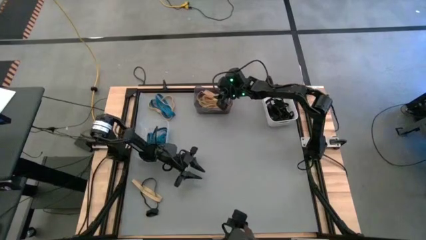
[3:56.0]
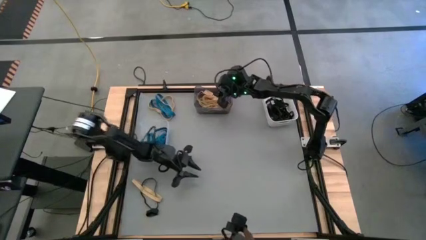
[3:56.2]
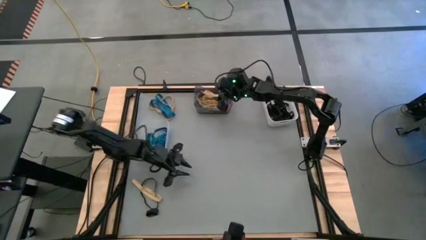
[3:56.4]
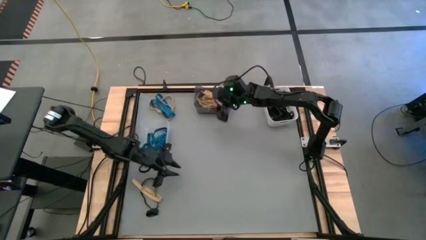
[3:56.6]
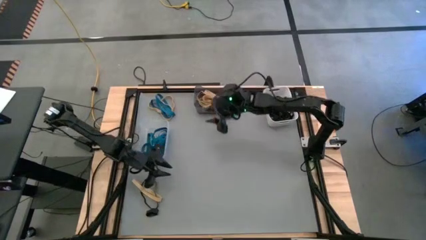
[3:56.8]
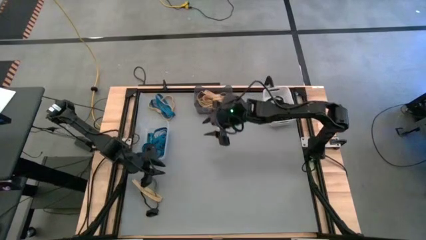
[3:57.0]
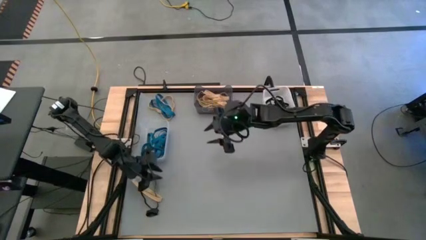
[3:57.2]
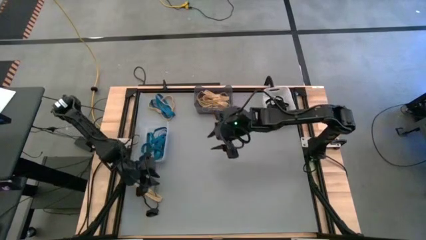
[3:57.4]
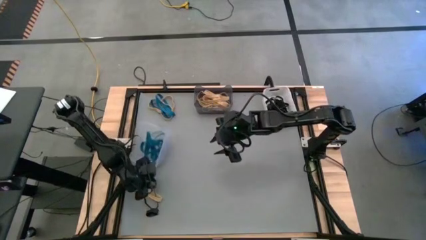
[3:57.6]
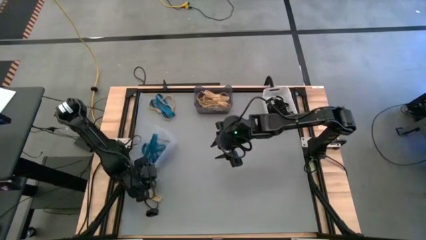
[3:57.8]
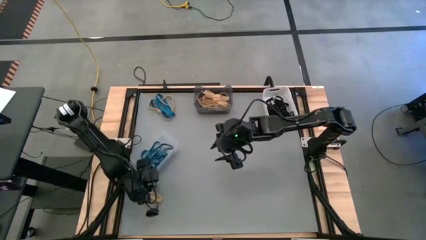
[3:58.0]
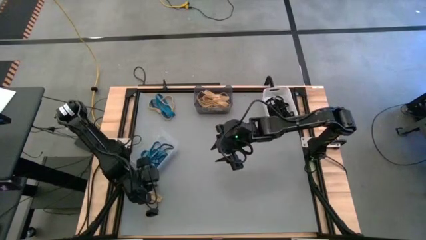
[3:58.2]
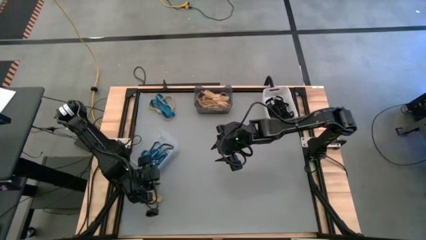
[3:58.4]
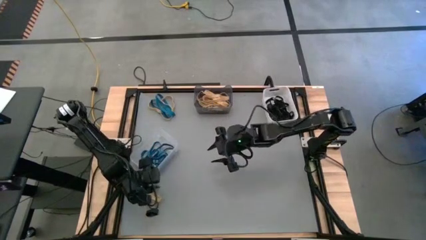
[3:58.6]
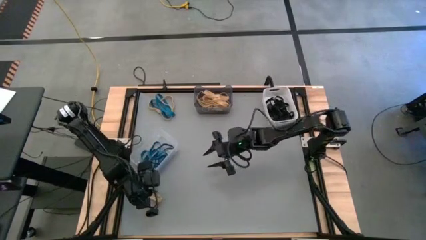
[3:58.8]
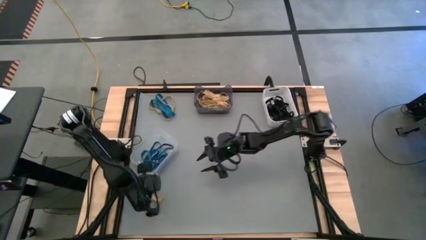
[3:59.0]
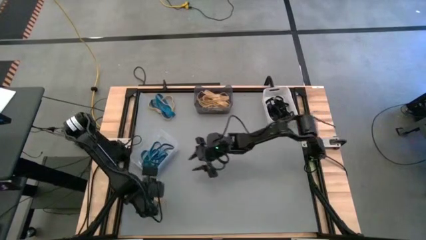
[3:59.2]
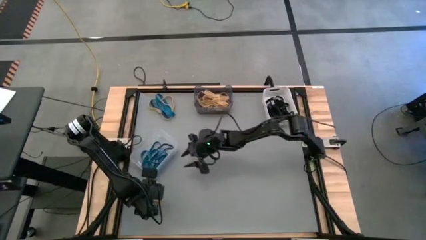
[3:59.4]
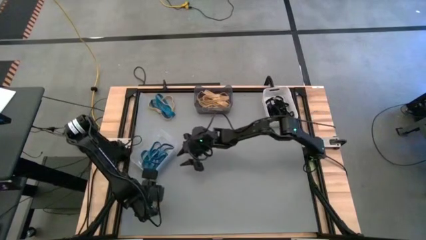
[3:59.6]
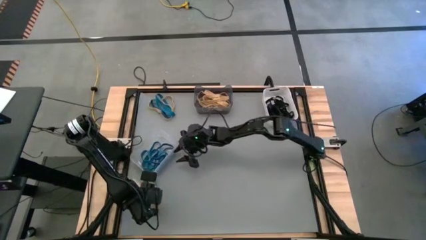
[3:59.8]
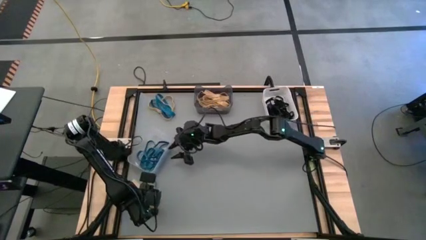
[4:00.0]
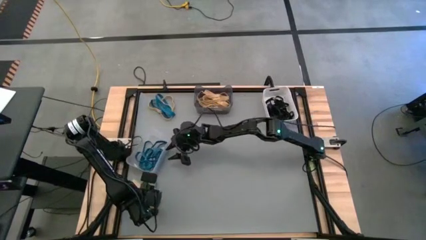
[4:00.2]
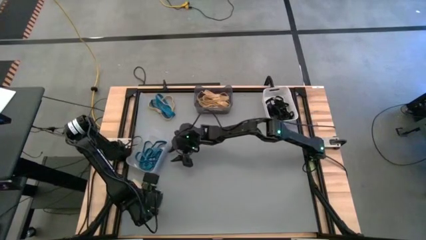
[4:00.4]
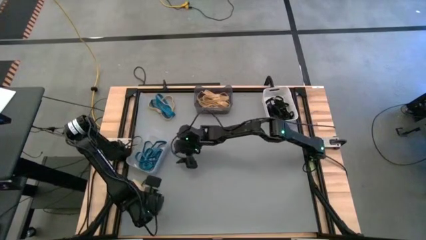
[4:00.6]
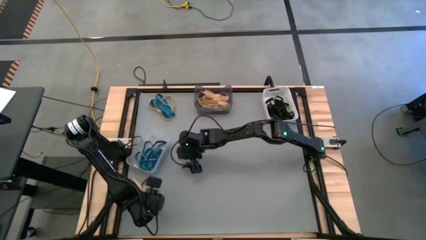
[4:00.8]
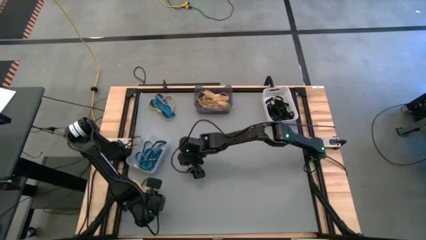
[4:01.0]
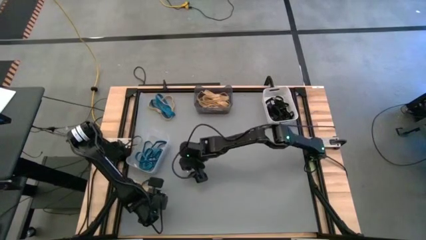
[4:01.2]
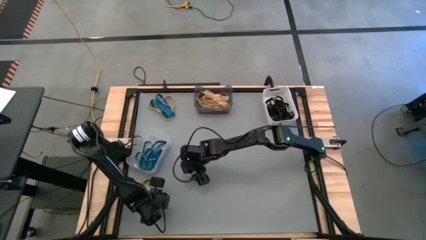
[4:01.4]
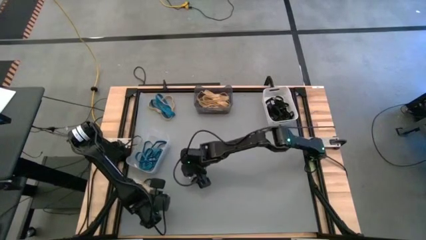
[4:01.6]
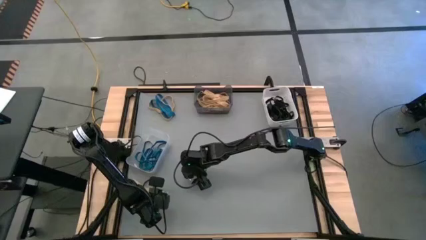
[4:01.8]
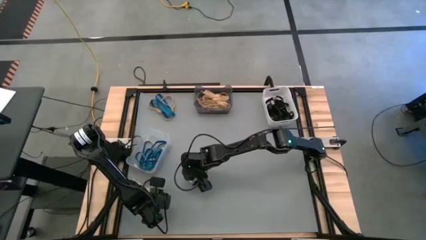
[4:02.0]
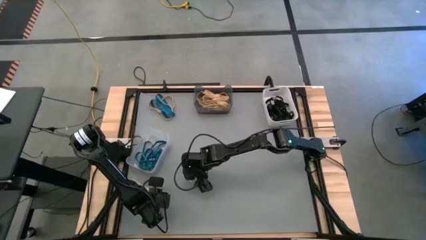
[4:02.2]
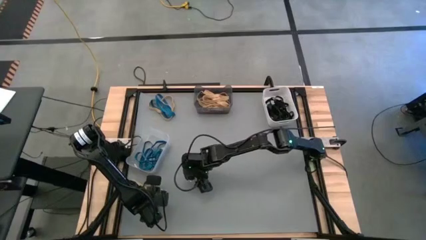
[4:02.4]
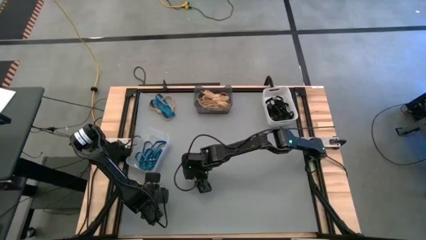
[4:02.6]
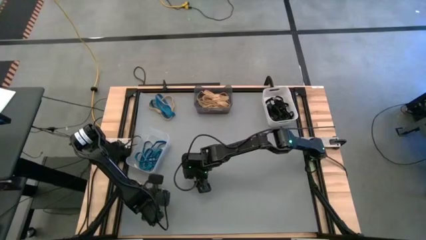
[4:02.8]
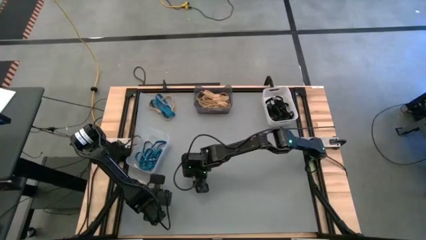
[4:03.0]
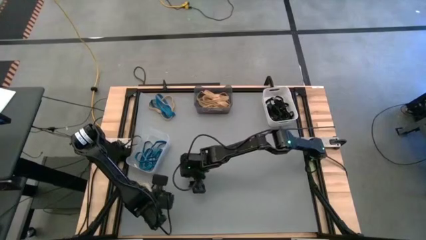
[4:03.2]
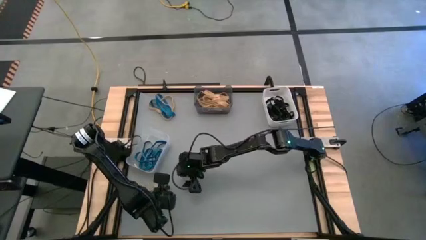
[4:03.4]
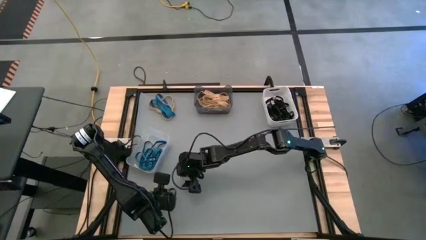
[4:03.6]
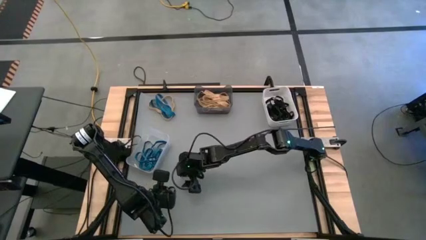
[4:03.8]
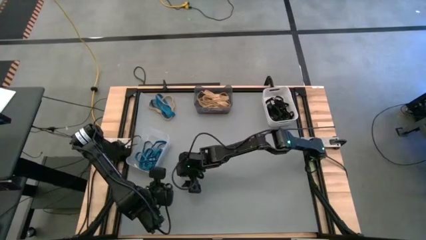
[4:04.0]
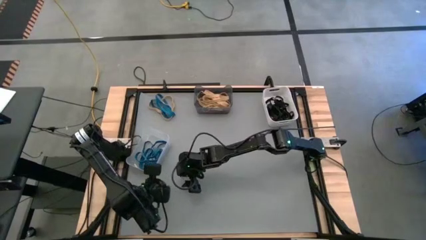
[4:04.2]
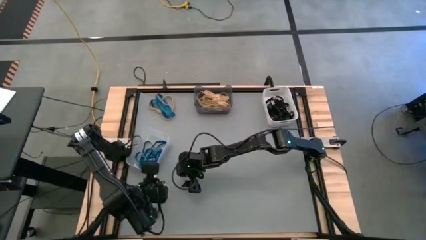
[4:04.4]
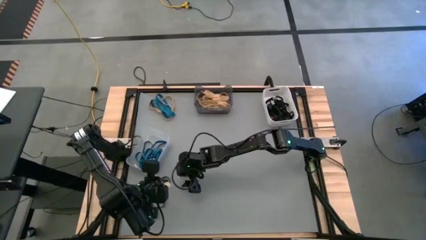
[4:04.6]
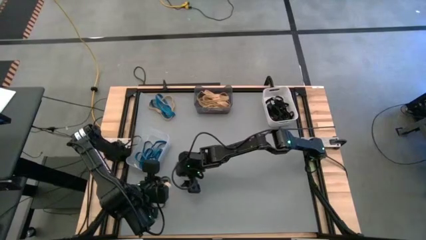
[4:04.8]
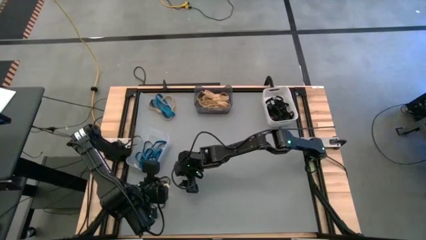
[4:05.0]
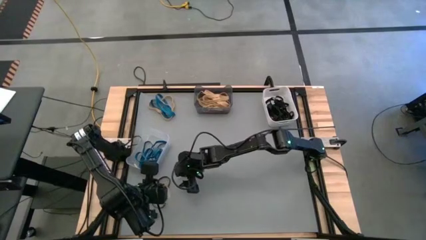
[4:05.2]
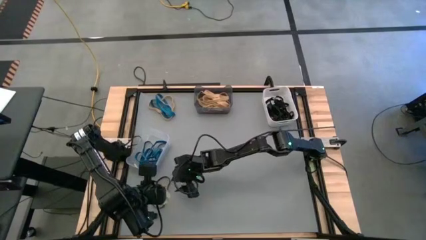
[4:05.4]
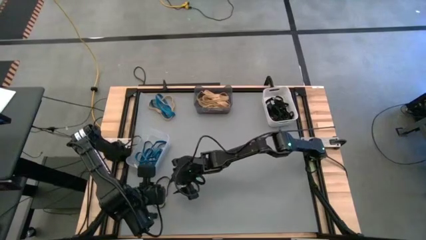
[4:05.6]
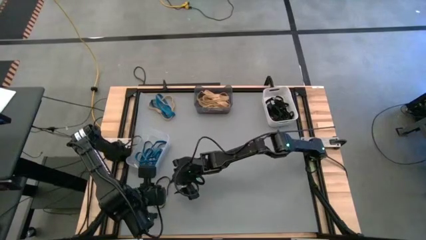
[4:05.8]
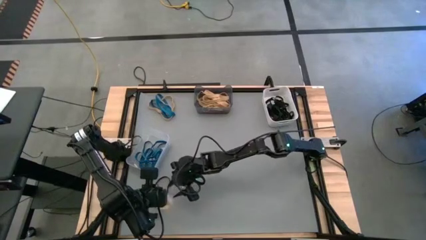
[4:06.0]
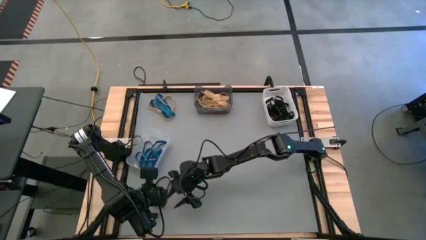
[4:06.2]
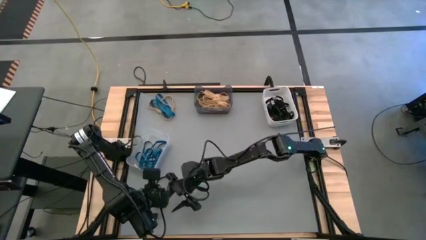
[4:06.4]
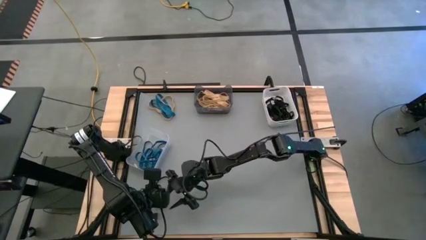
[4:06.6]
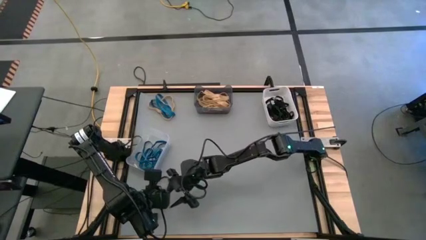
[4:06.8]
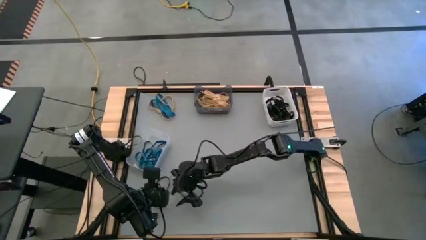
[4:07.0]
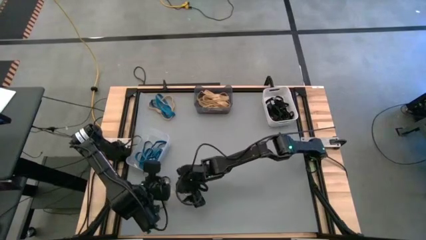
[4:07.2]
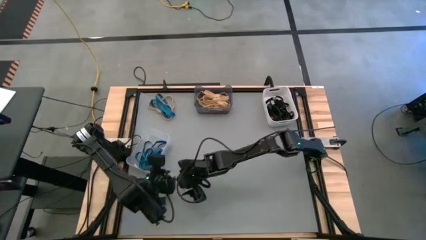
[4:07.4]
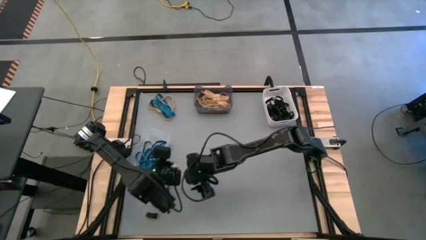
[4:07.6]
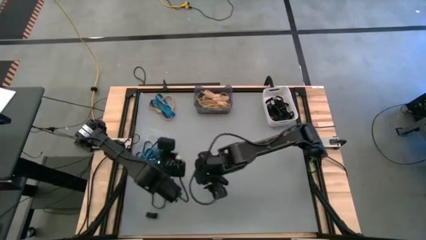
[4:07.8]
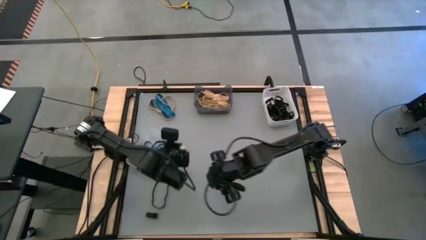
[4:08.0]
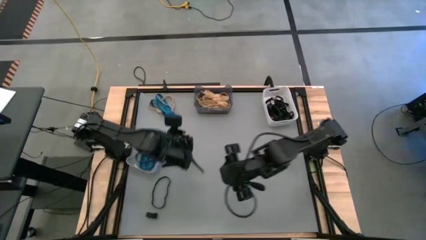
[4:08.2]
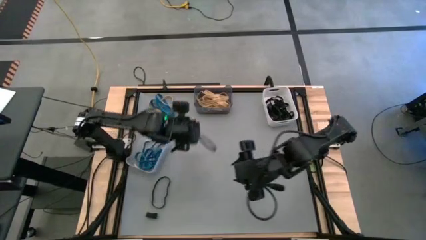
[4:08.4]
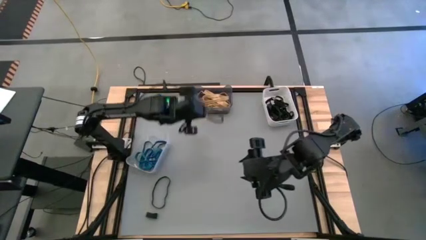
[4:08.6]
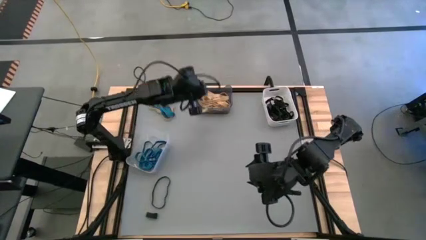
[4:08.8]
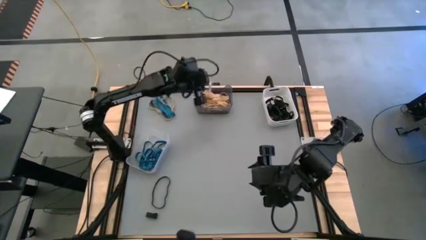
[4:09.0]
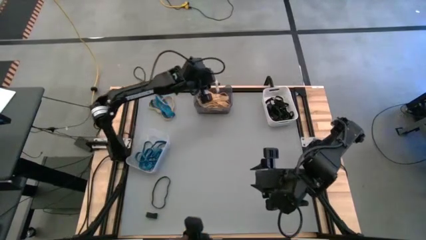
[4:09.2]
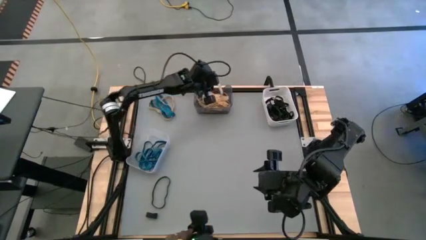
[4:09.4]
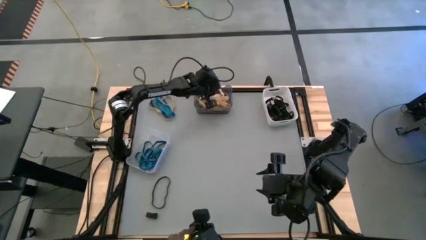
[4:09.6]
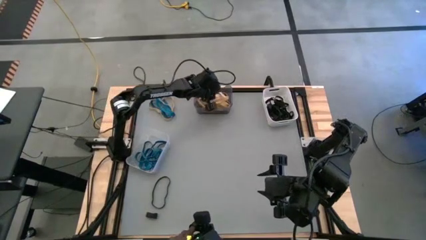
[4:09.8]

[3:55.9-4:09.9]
Task: Sort rubber bands into baskets
Put the brown rubber band into the black bin

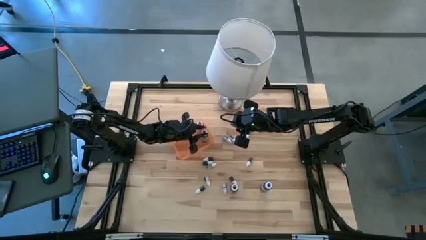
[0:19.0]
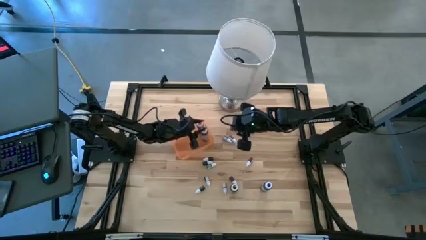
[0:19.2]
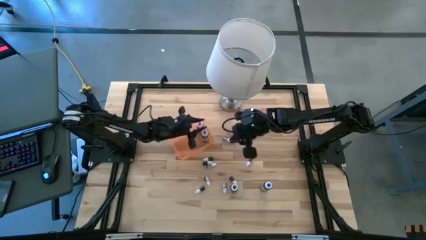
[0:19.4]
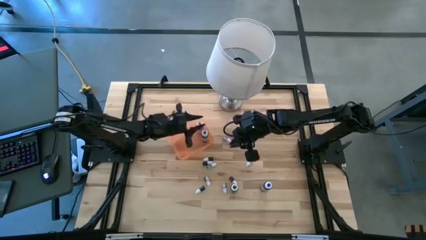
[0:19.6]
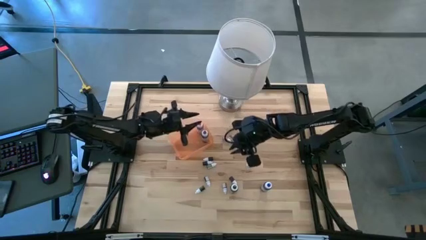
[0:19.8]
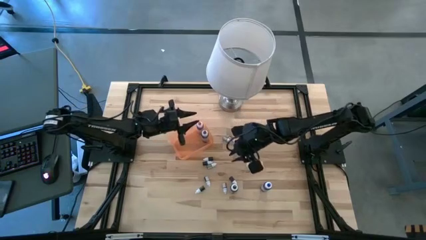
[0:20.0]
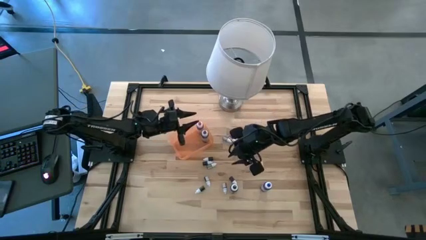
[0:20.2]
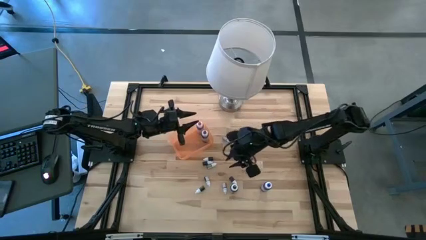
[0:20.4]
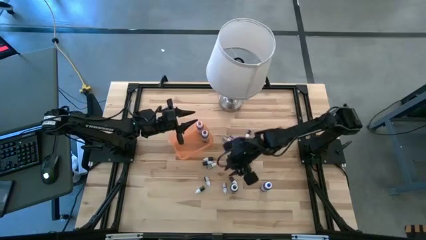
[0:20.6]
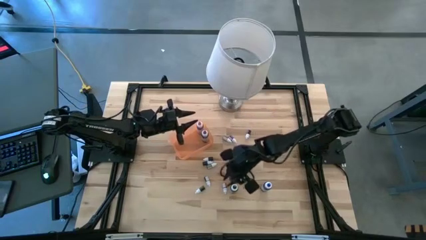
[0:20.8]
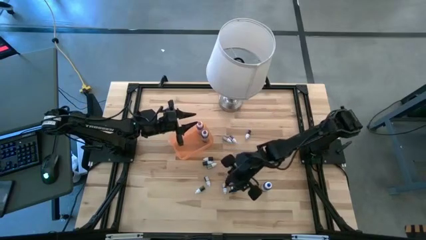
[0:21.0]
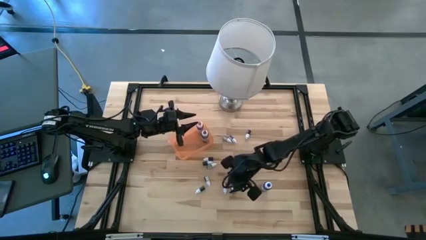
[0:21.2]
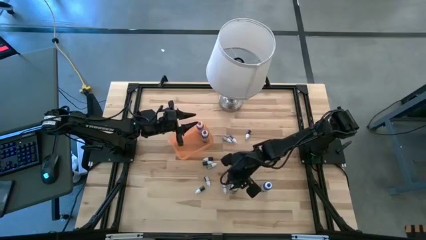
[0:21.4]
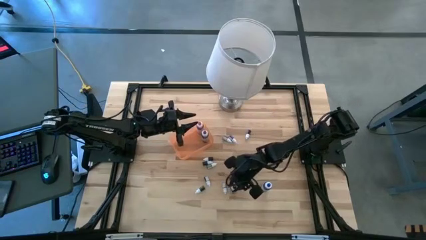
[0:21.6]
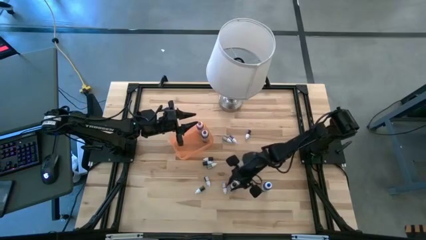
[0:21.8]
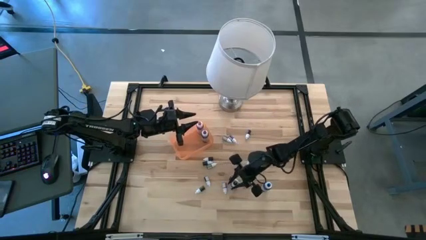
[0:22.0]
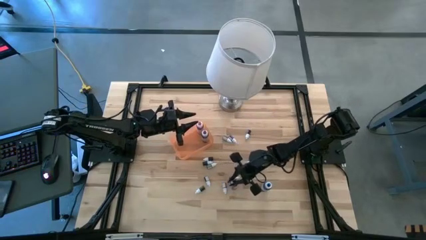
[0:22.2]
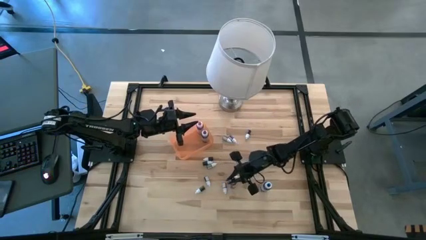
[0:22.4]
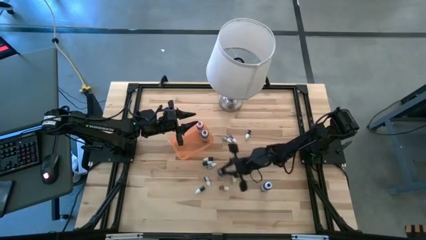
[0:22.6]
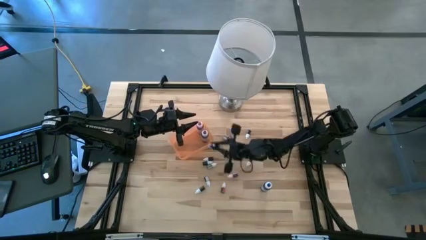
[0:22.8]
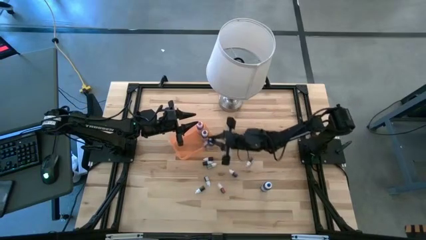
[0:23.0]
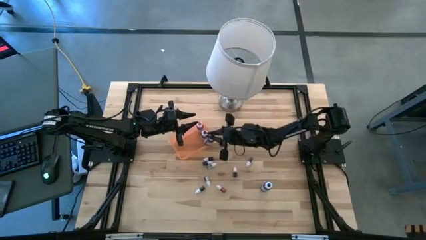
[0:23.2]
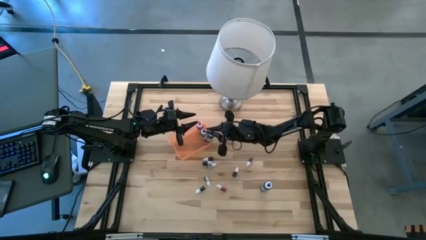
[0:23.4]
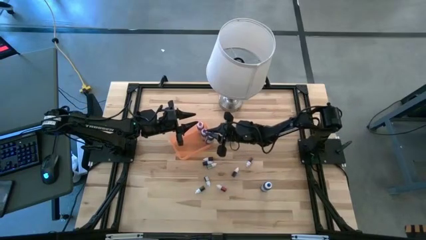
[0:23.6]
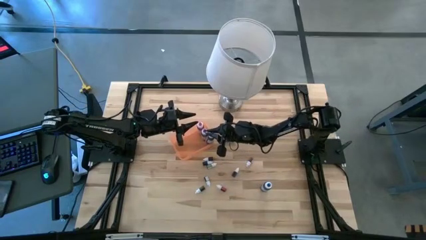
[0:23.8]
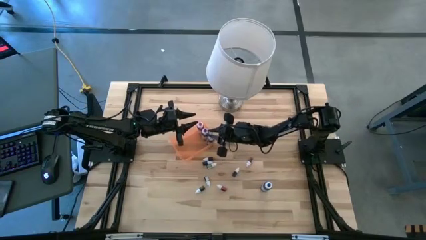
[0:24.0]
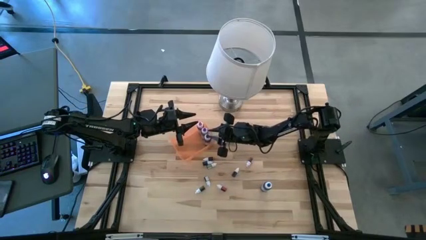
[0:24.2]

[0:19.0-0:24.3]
Task: Pick & Place food coloring
Put the large black food coloring bottle into the bin
